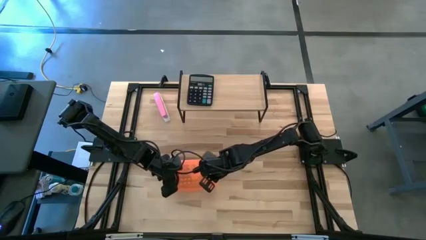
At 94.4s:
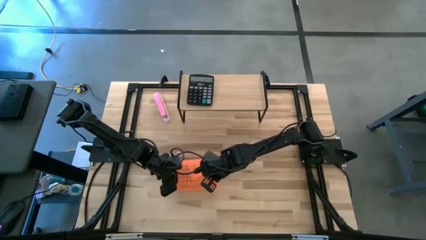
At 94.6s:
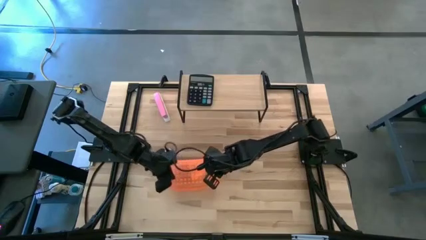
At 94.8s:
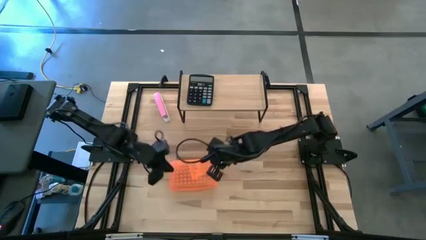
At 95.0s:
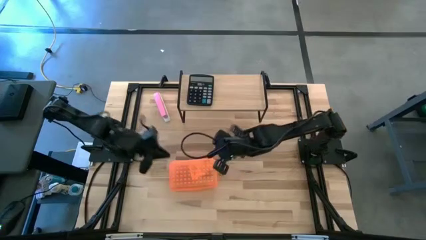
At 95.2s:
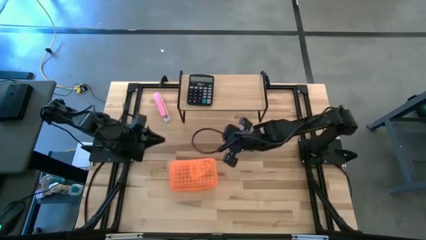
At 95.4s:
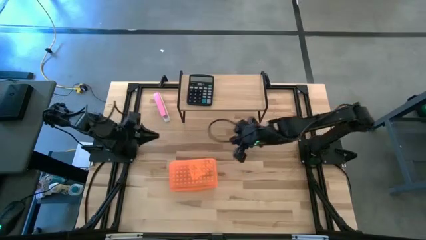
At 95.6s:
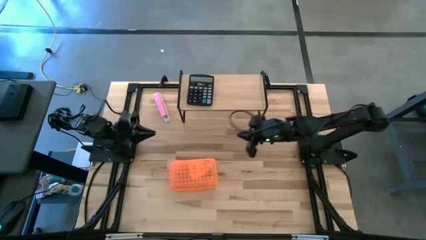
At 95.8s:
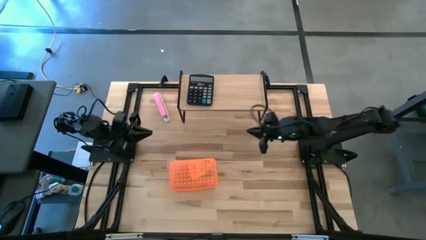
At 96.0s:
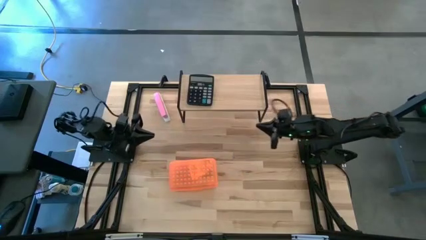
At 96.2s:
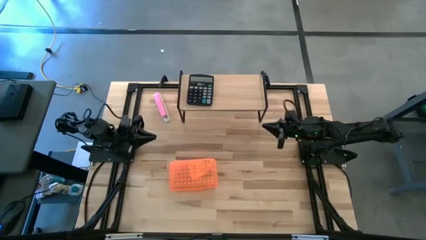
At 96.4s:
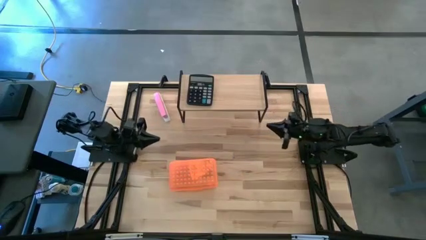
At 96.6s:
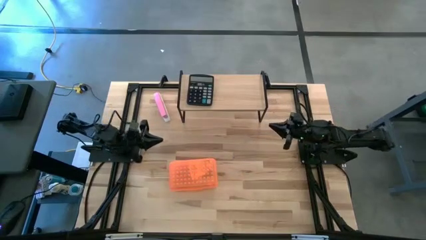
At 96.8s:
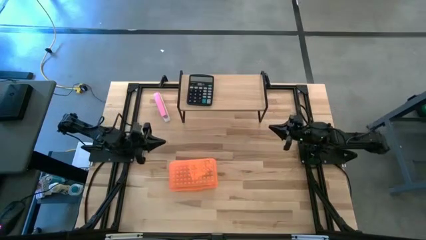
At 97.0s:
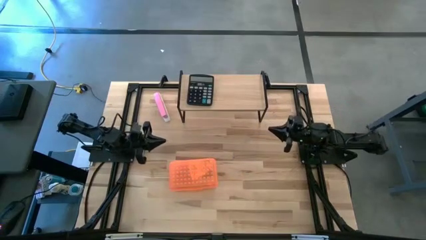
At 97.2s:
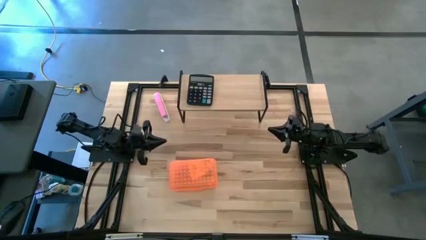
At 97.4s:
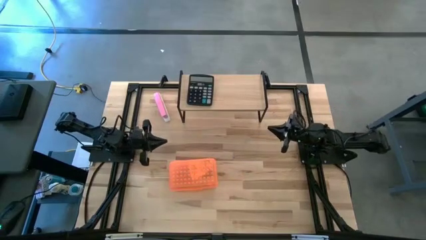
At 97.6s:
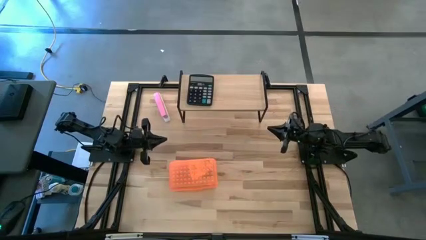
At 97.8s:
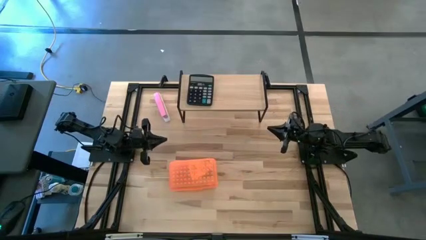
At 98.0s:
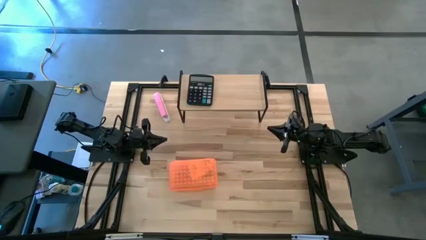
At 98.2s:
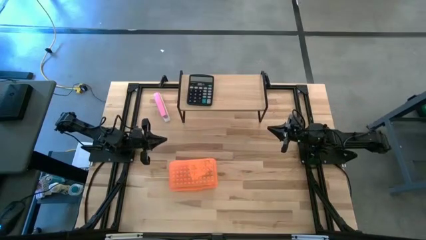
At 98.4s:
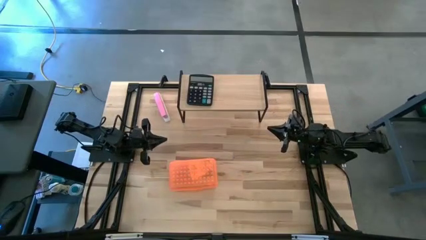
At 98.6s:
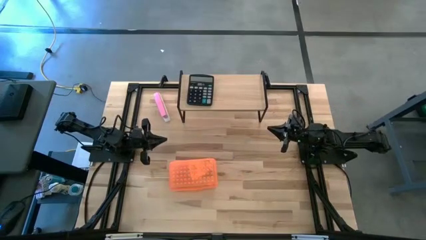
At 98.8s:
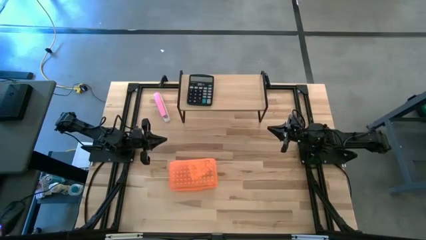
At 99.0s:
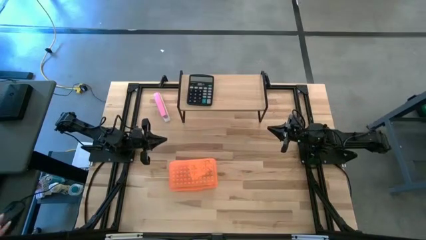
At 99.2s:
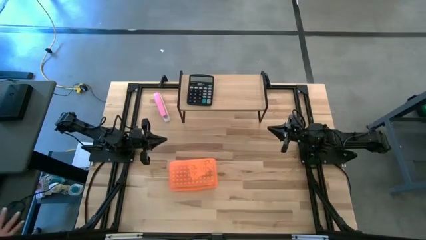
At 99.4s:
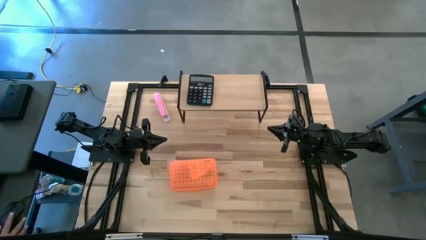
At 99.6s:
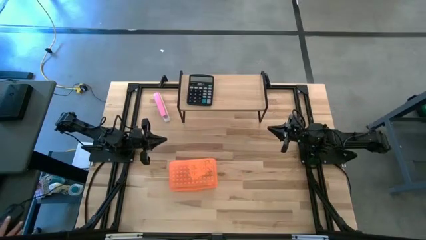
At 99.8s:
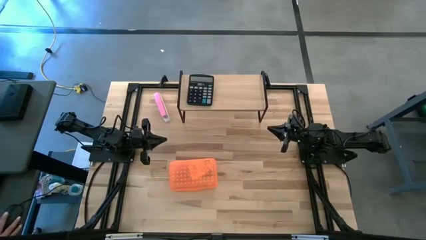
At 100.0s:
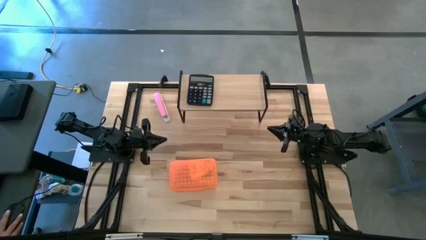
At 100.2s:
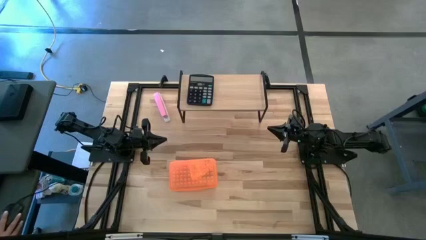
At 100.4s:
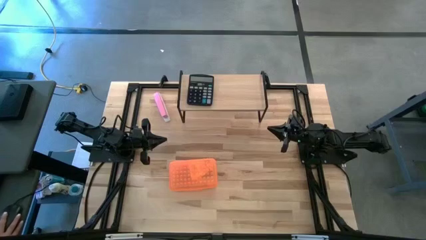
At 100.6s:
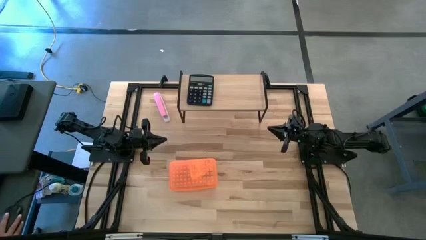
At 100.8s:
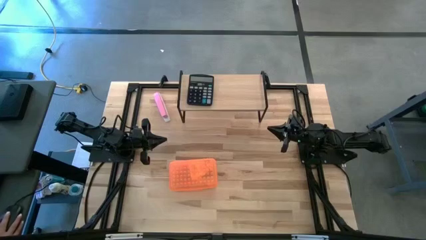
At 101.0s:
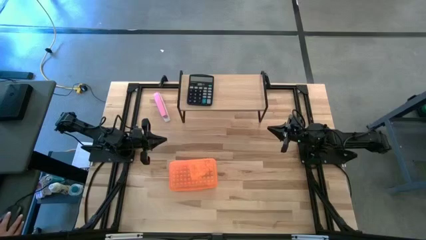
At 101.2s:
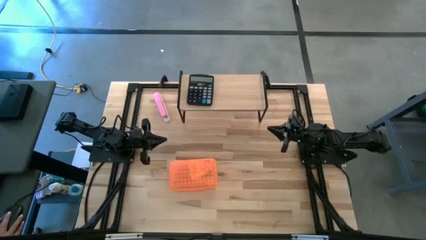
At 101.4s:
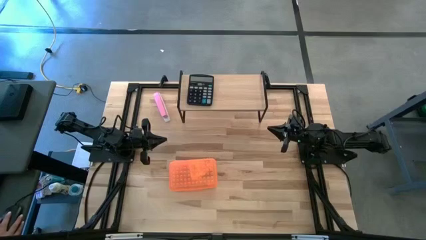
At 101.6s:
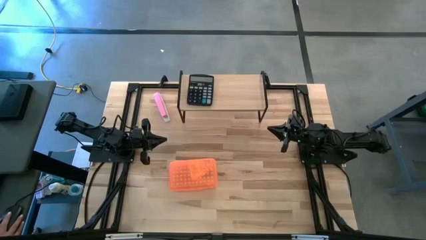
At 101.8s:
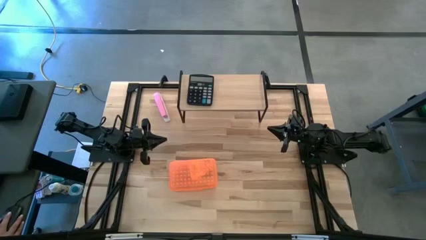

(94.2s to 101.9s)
Task: Pack school essentials
Return to Home Position

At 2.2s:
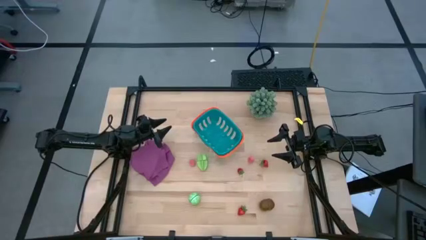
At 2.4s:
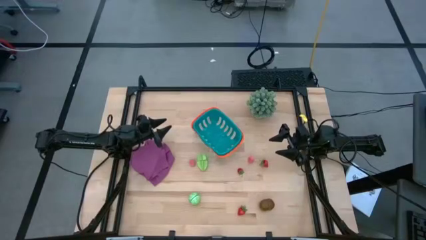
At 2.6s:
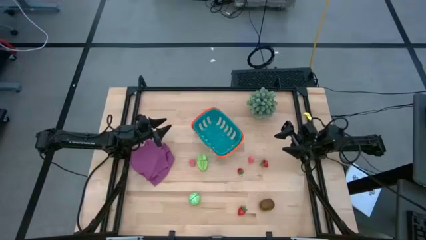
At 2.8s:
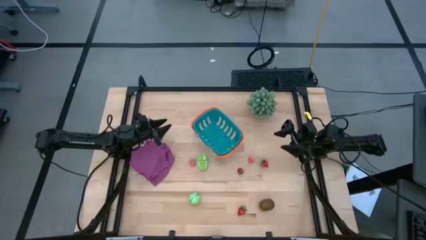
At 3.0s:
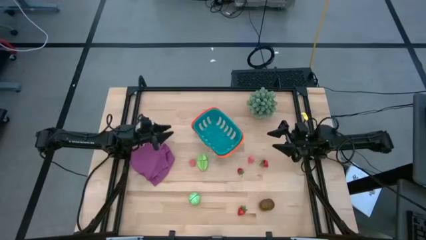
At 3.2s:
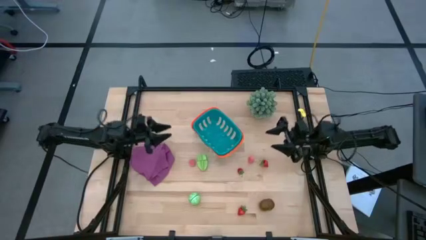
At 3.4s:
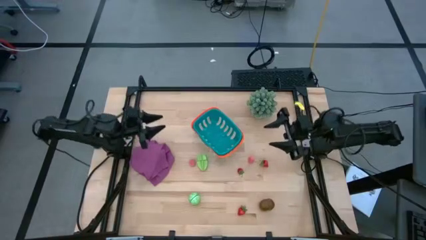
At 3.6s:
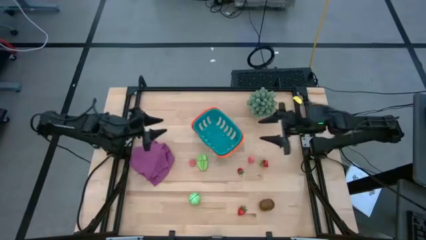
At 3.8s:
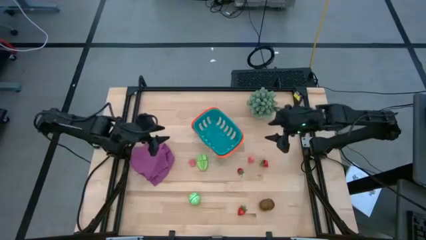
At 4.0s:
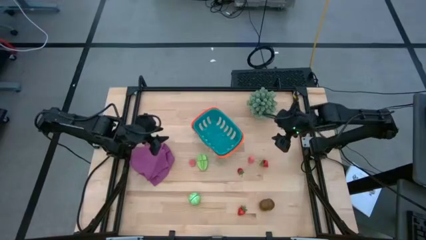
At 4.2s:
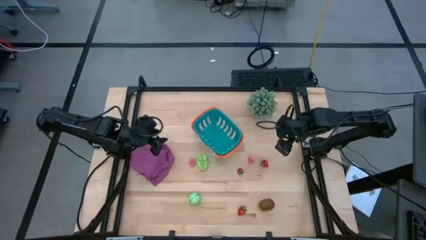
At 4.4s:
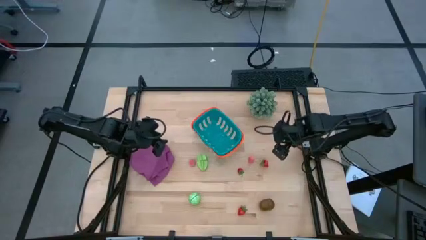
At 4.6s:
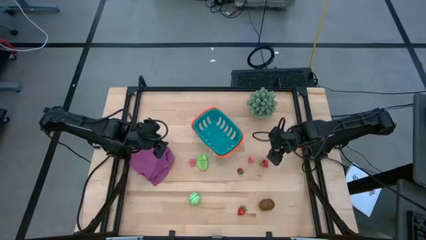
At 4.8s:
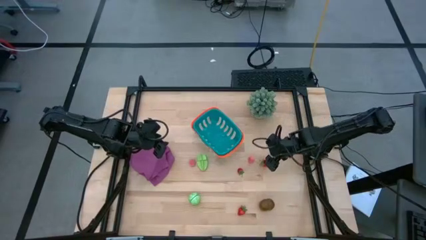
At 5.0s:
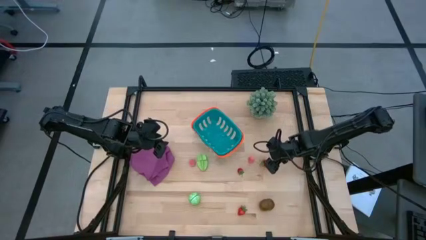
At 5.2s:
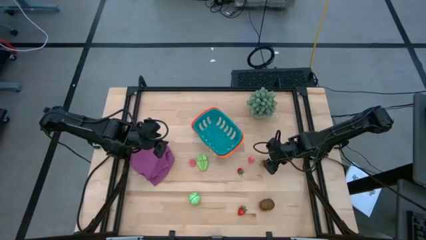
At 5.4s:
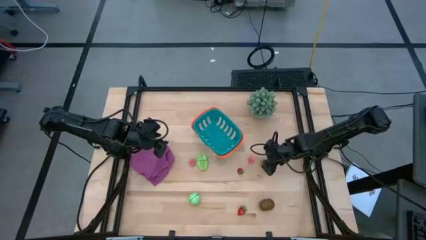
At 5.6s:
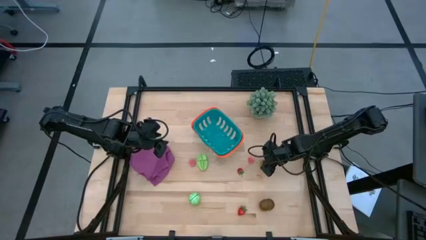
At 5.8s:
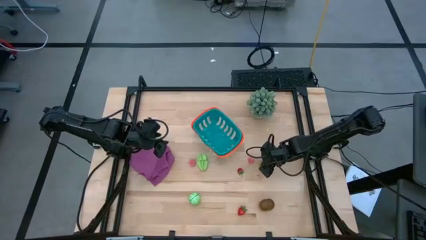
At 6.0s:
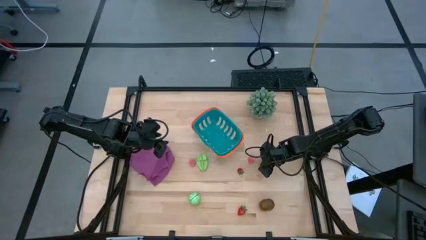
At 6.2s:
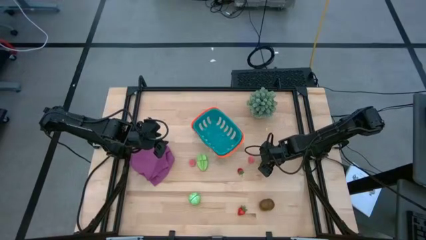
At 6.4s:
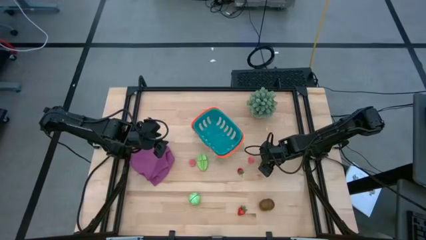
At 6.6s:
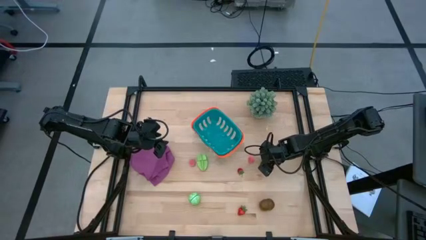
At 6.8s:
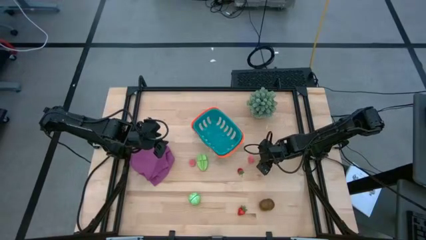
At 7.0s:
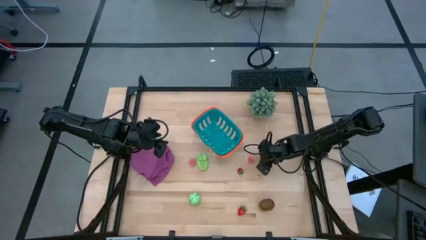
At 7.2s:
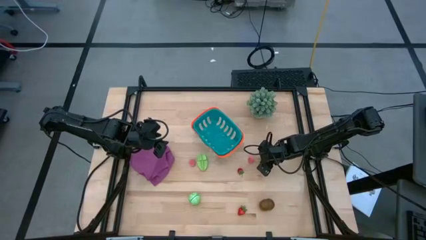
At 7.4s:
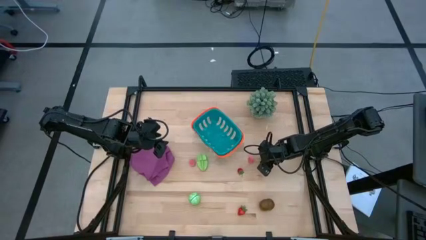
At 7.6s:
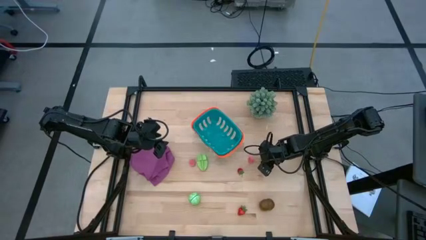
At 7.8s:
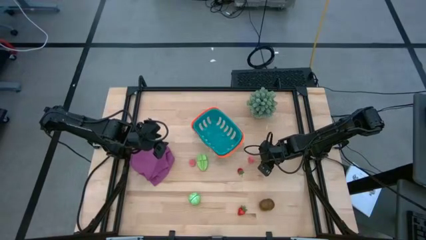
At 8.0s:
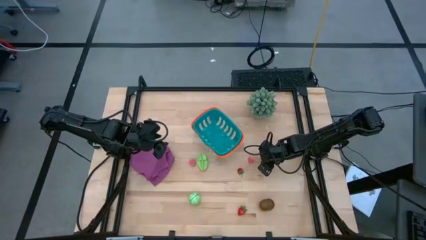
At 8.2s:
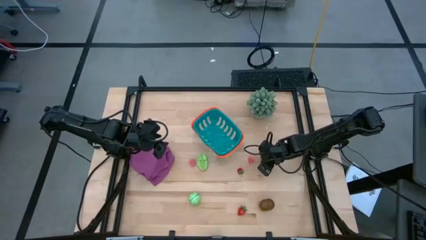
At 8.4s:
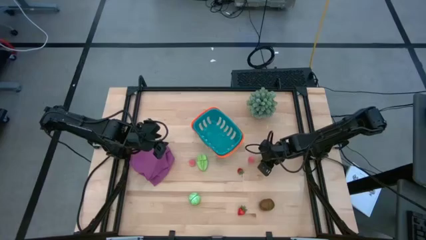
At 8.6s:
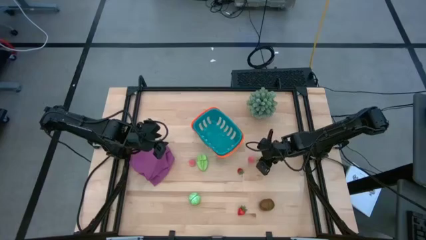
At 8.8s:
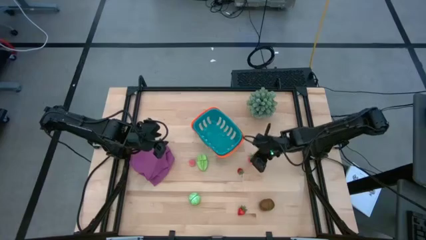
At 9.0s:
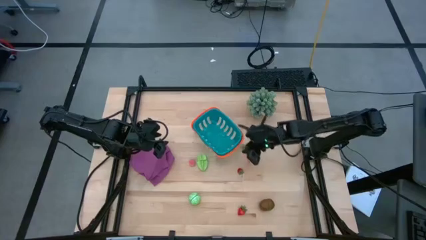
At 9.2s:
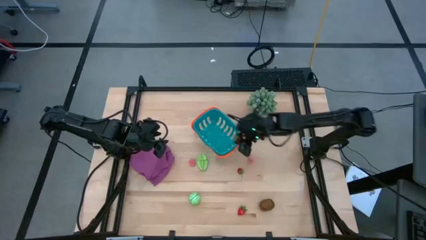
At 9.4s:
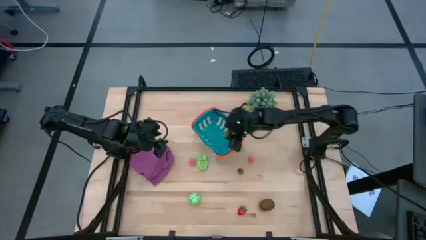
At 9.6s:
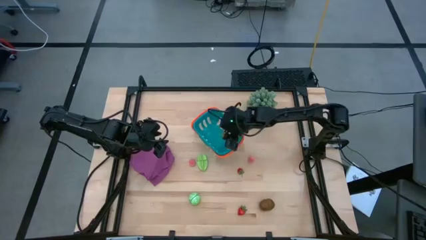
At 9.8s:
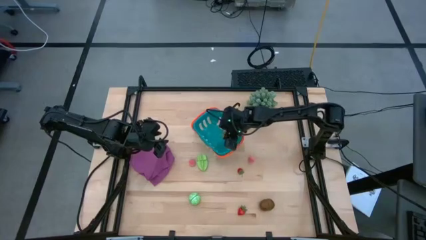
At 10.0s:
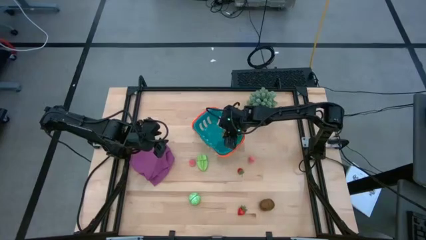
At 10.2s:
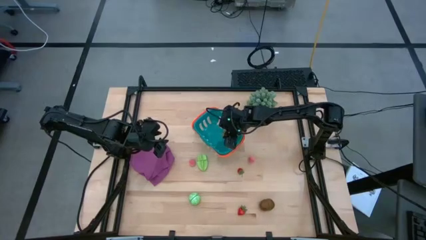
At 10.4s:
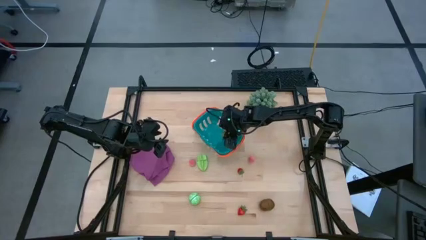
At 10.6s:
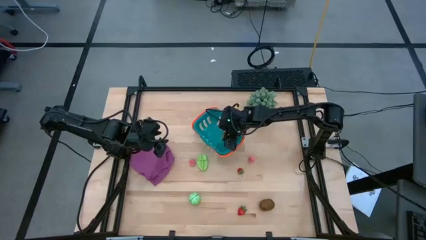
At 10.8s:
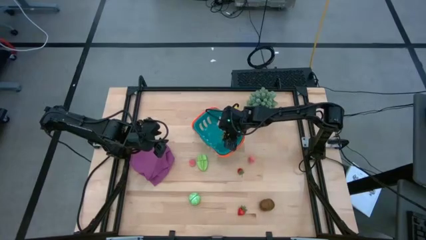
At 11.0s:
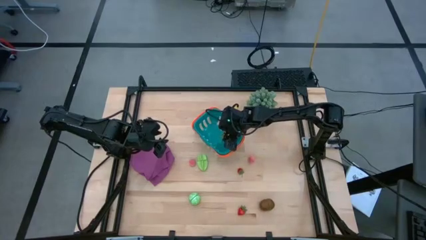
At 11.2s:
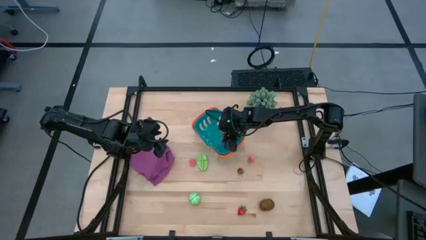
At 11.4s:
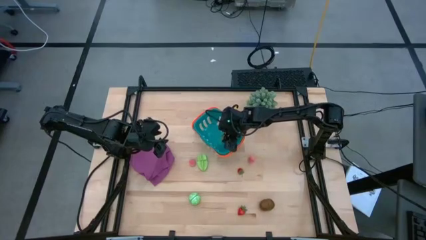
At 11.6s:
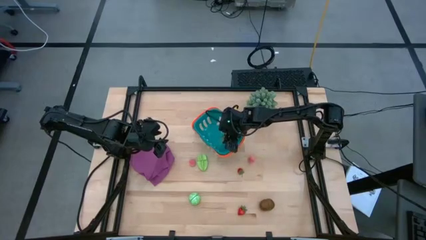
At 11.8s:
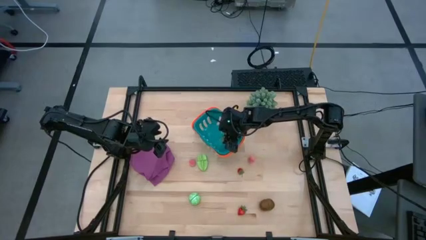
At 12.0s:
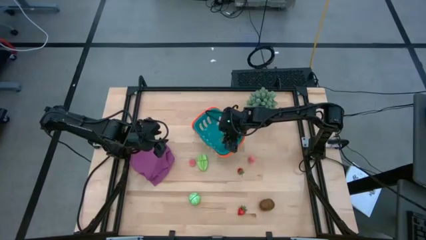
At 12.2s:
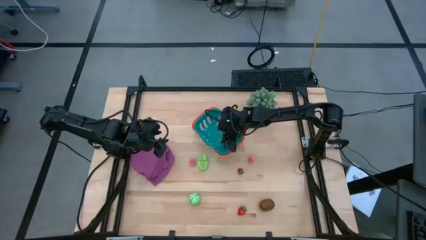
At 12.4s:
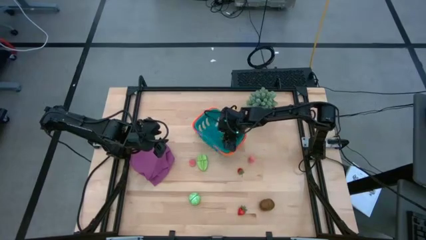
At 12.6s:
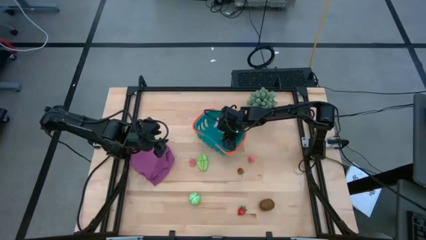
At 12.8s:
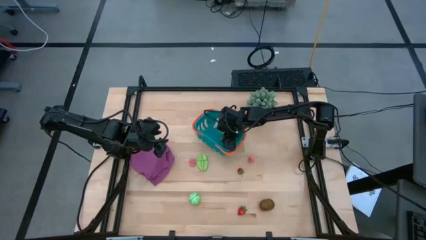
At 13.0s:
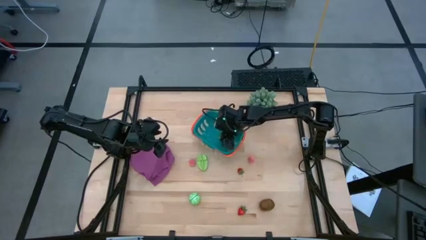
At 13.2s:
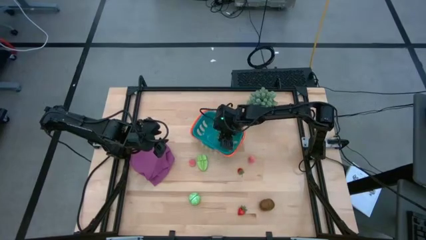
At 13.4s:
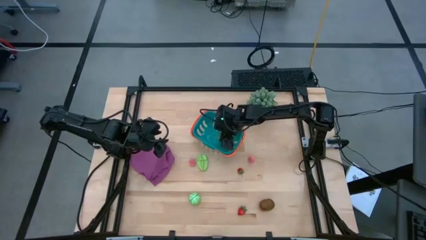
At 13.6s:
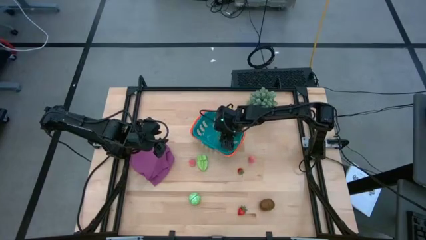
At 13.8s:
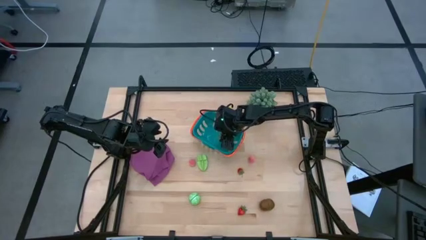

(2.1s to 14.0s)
Task: Pick and placing Produce into tupperware
Put the top right red strawberry into the blue basket
